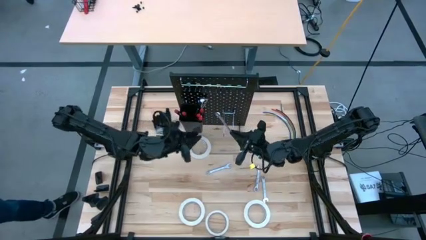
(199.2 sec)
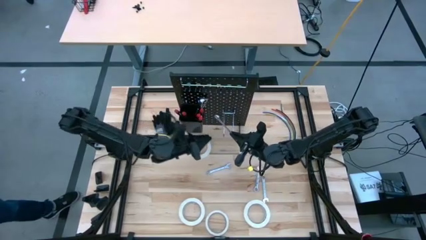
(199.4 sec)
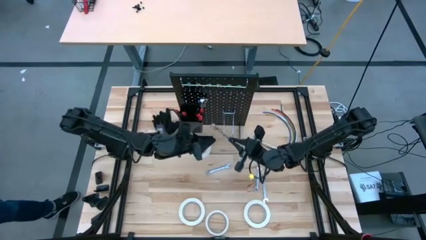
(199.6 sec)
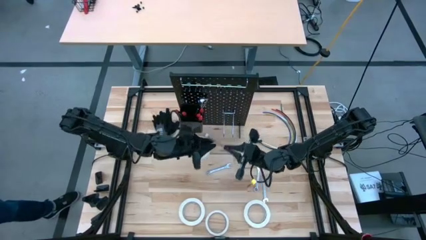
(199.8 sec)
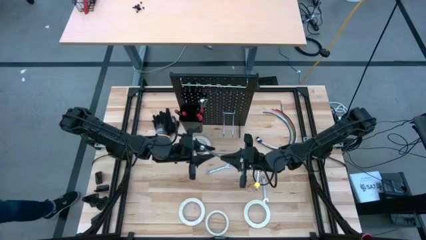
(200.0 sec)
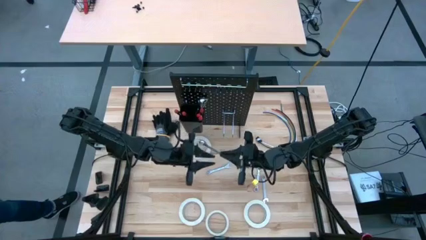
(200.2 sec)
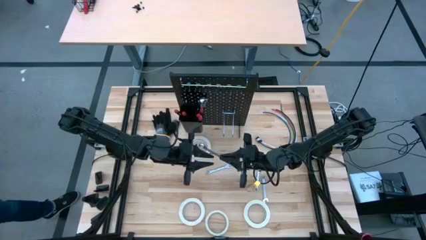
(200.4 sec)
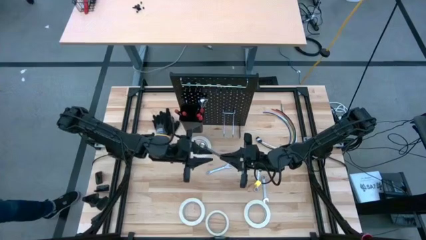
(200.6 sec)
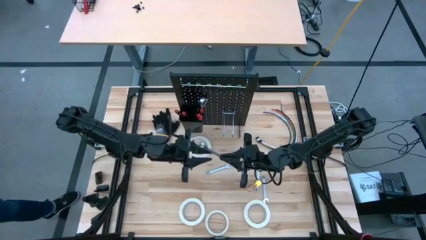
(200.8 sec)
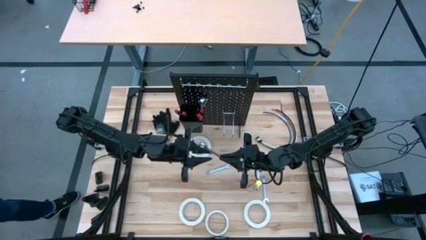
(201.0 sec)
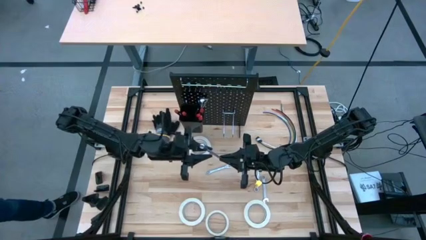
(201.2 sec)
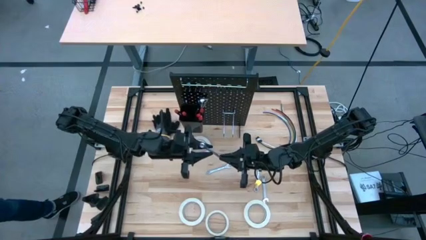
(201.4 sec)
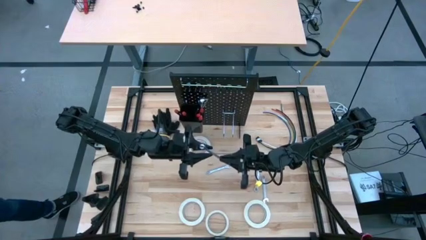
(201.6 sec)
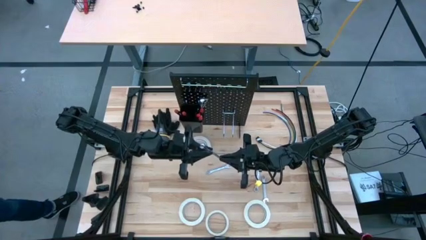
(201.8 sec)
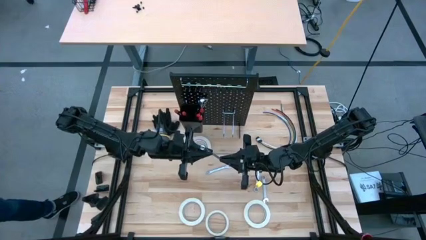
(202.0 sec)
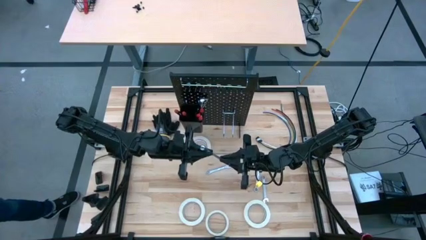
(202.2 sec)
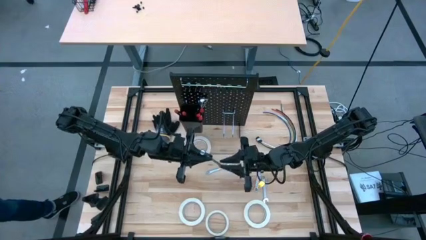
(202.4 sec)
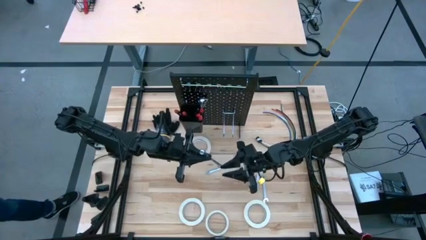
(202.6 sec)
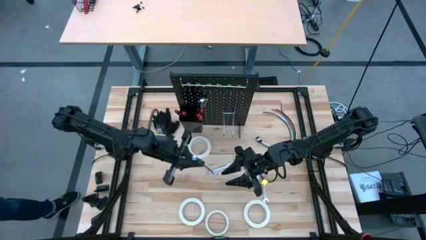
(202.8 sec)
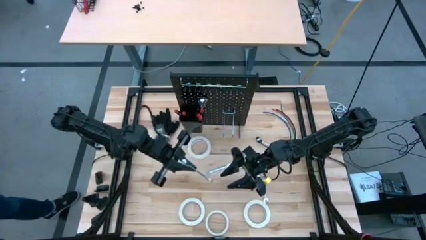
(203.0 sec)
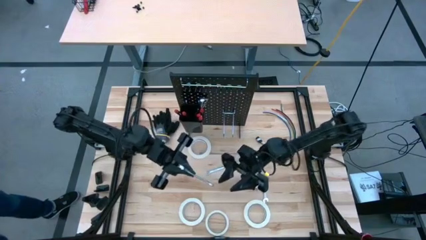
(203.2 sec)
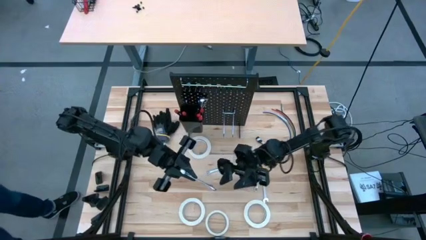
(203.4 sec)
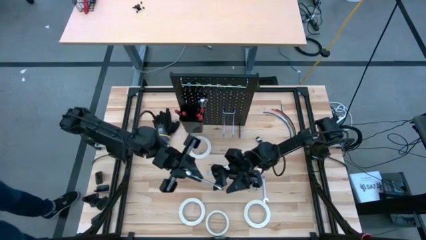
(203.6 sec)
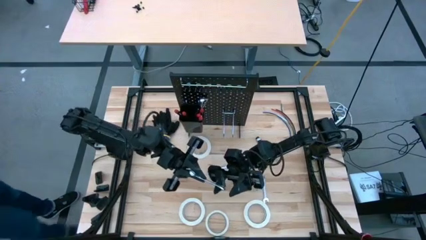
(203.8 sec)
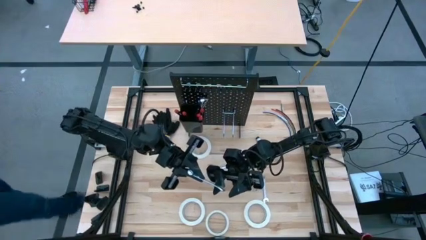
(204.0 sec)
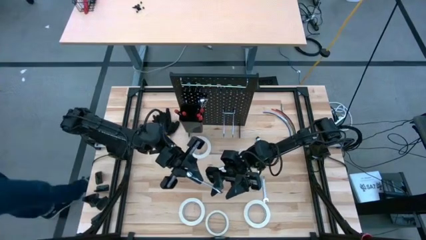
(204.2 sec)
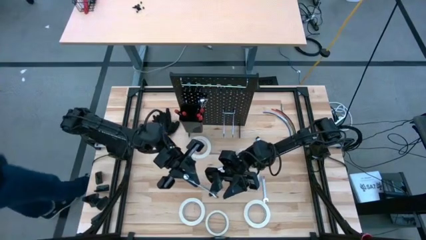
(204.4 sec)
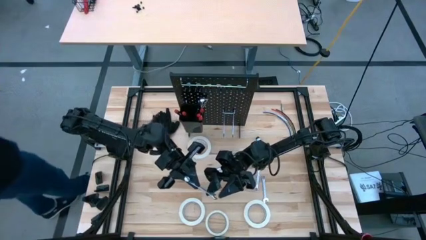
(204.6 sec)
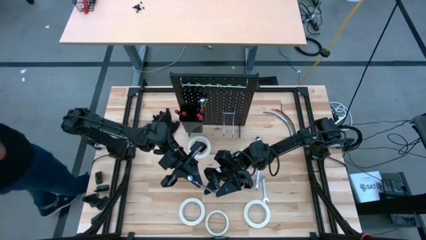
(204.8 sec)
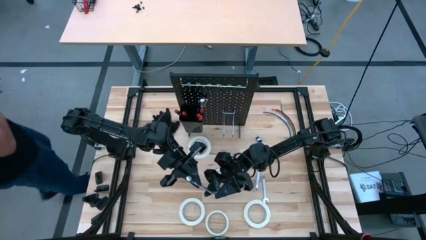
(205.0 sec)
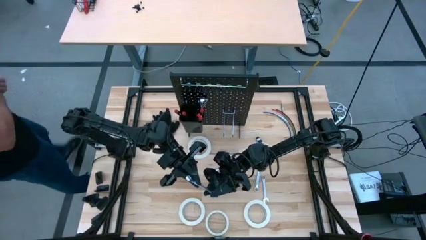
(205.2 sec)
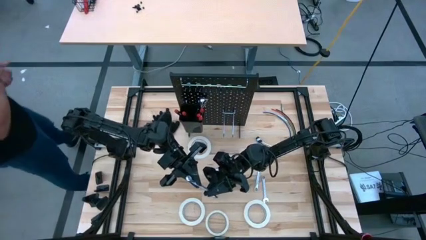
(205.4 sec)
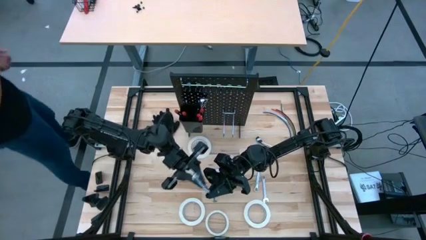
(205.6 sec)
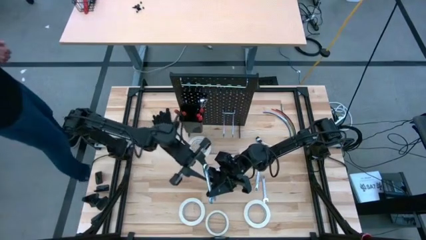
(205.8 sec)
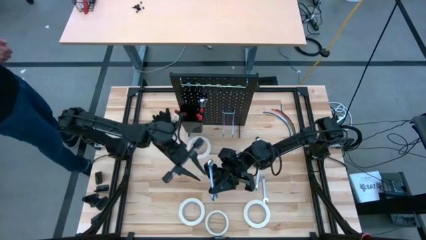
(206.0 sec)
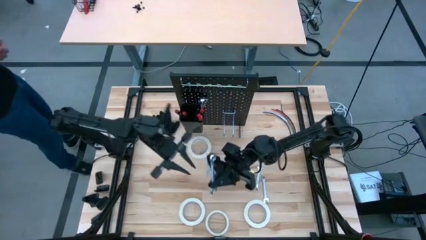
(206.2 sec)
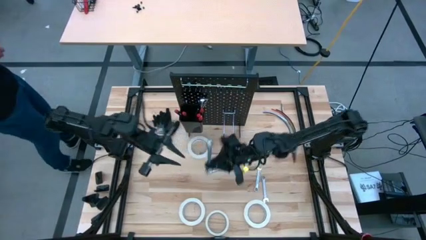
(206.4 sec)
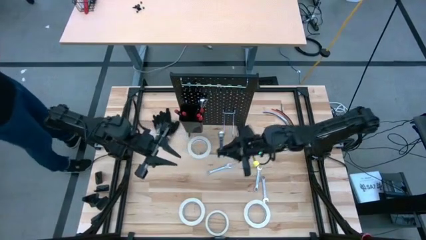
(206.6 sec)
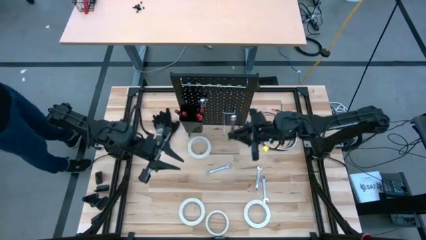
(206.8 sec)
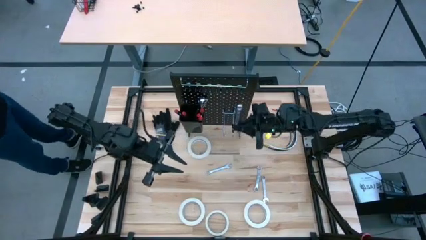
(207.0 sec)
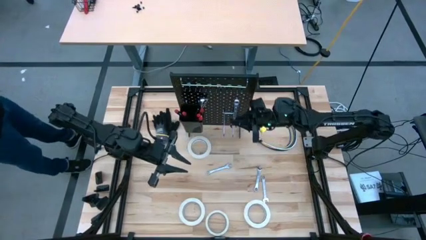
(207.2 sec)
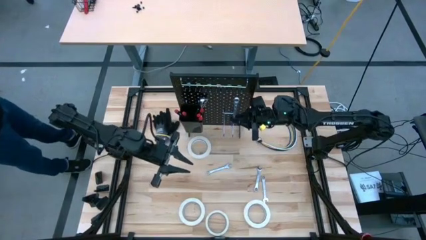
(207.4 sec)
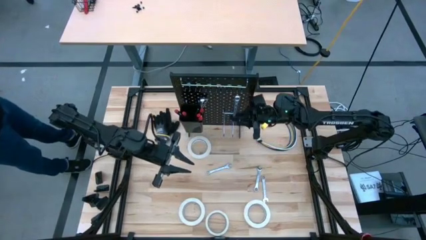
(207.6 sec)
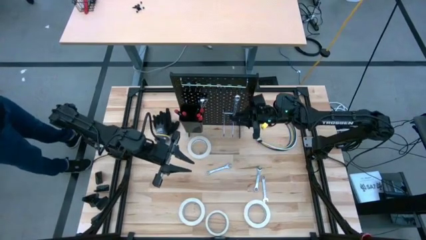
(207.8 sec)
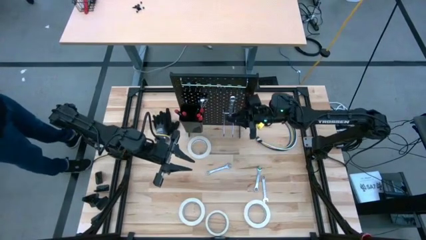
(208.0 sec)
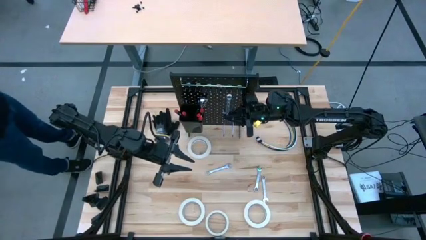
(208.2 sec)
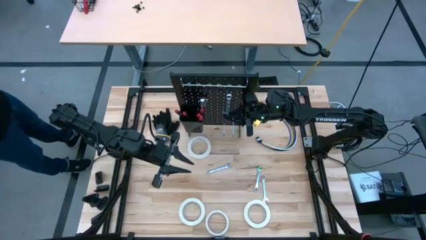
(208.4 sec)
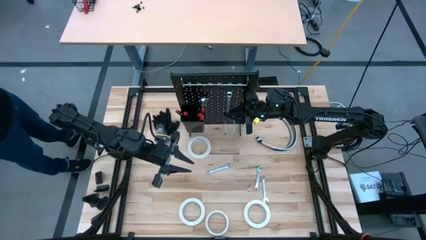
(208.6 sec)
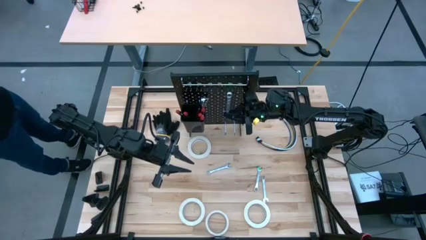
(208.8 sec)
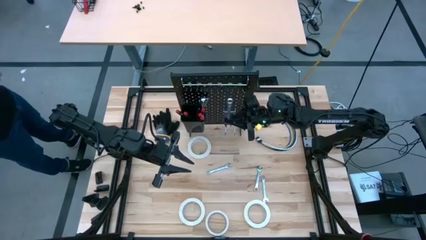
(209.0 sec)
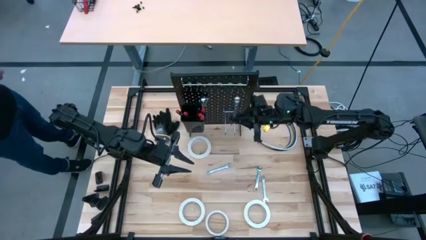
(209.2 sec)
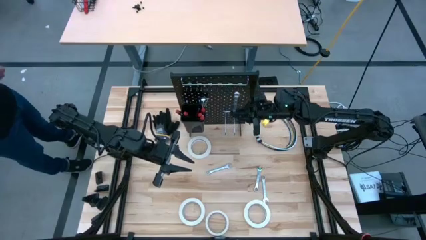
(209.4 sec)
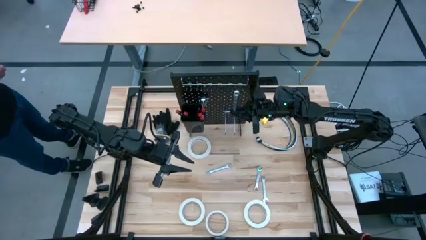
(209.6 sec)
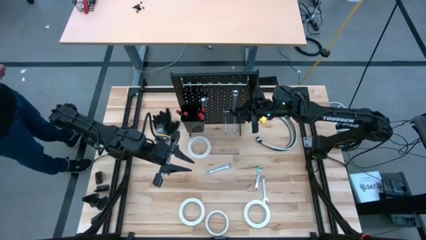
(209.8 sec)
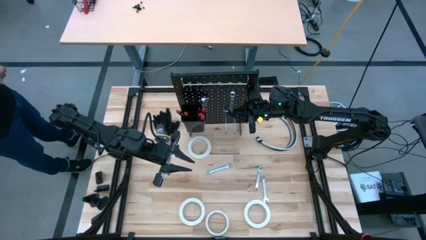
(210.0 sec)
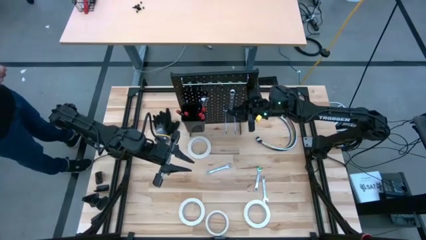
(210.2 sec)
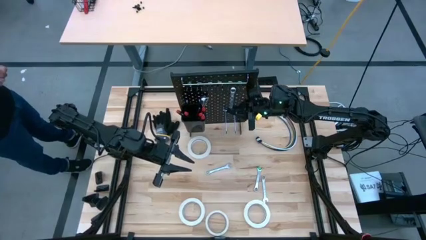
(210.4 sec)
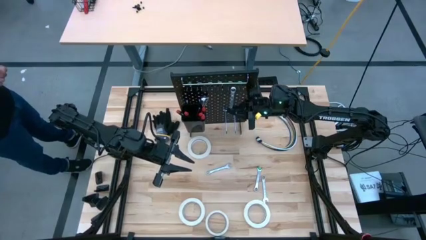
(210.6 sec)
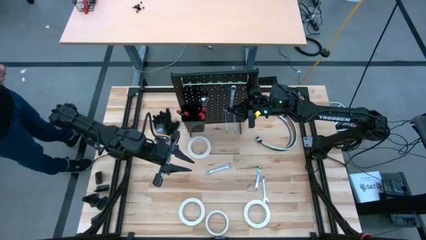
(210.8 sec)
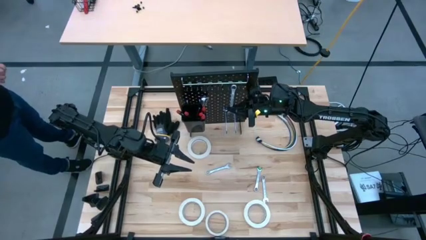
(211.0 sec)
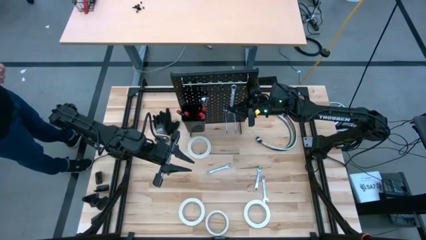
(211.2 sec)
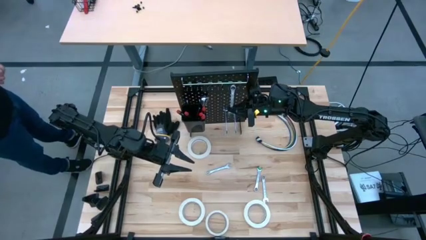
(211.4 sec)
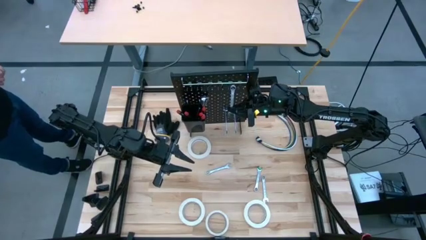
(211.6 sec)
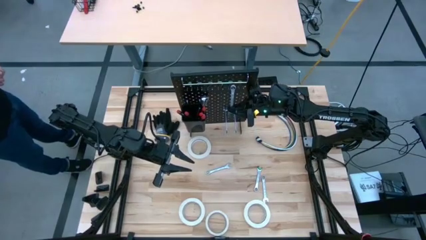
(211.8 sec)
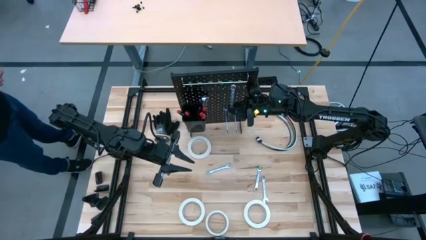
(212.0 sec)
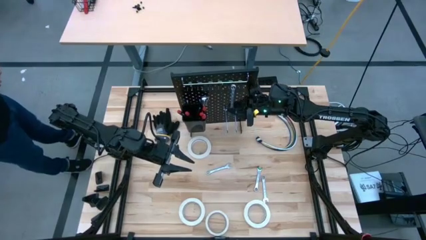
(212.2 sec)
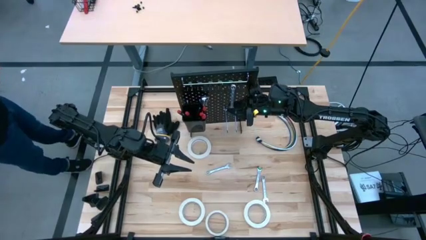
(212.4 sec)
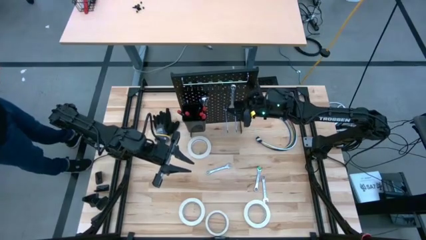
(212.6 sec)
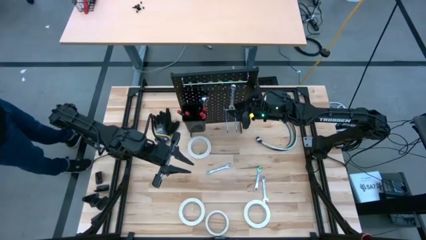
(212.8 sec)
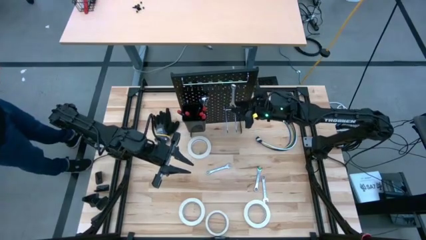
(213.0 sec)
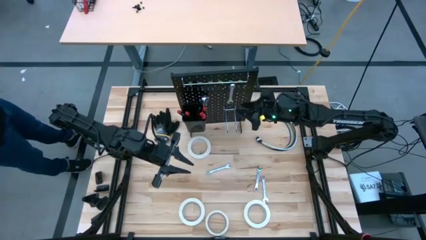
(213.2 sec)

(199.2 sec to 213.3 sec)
Task: Hang tools onto peg board
Hang the silver wrench on the peg board

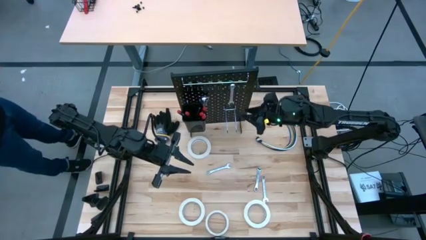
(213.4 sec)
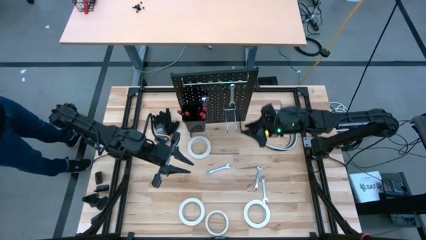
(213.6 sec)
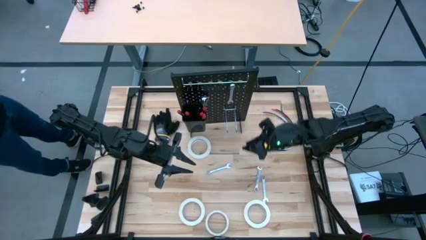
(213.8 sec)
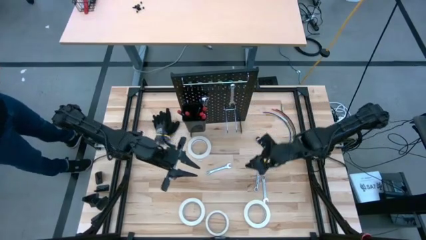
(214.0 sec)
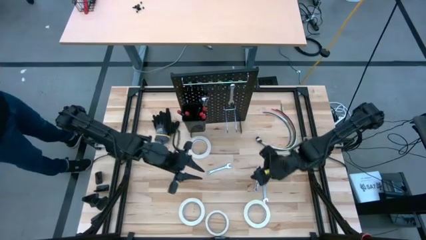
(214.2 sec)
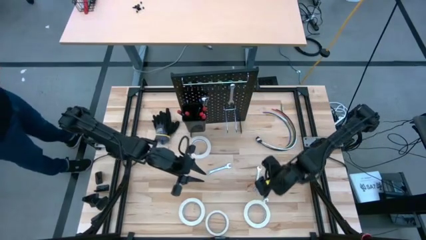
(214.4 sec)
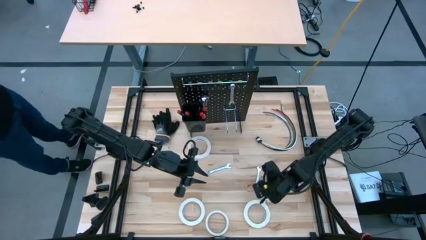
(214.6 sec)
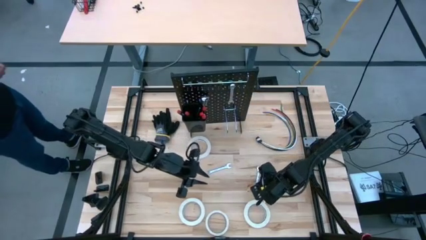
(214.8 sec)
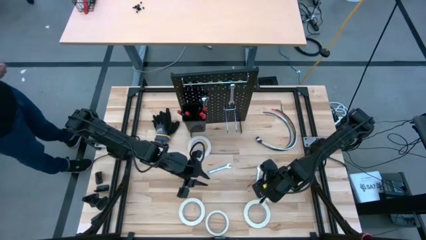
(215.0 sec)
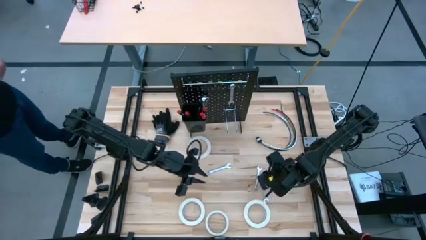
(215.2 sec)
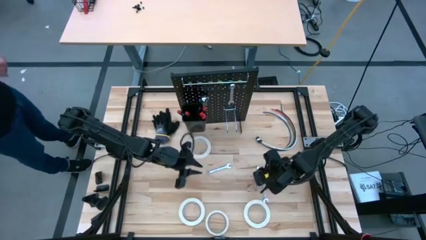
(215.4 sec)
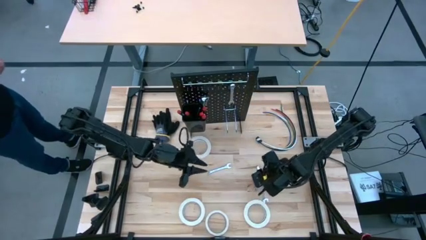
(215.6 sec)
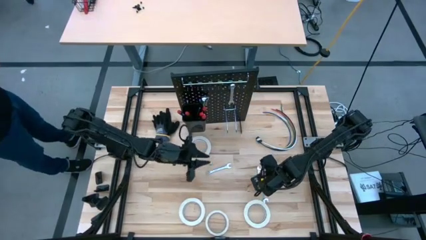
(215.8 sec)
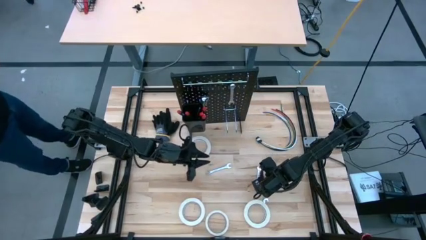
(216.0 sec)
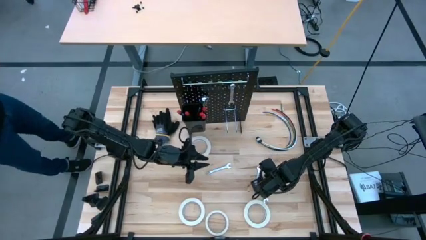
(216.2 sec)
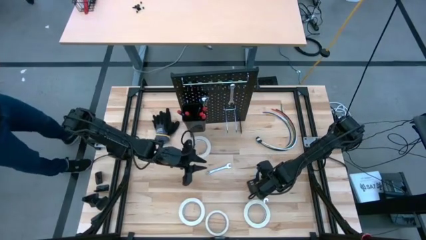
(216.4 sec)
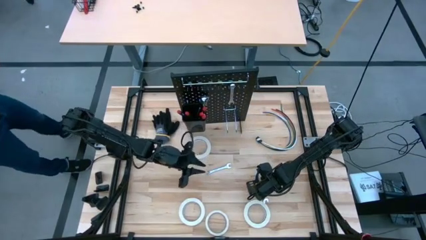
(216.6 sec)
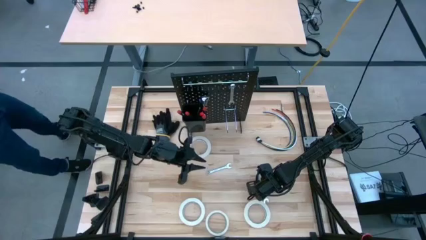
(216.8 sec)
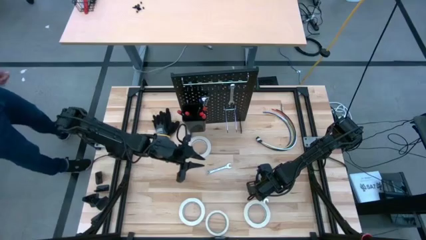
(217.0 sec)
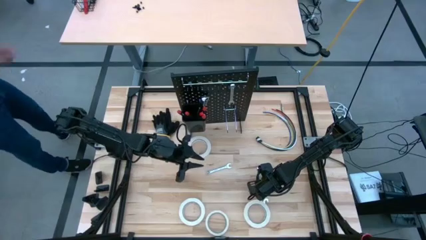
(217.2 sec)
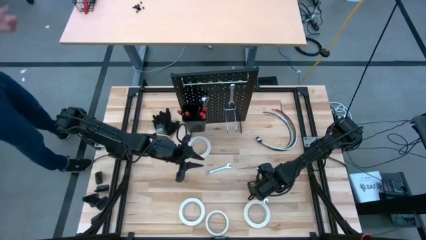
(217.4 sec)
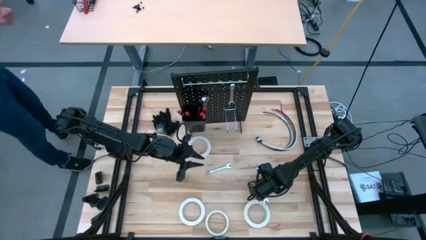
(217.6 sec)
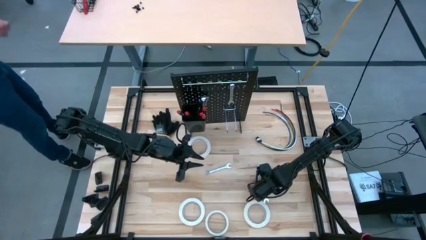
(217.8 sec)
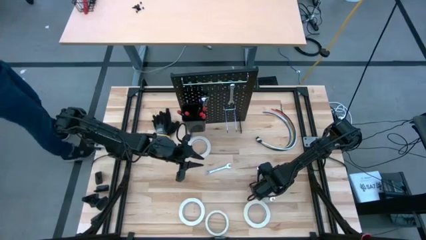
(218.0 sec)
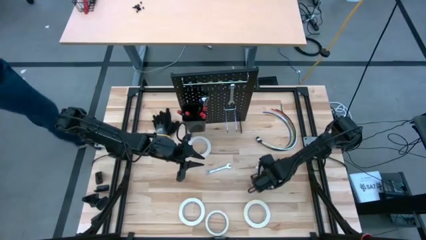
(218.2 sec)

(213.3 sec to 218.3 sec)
Hang the silver wrench on the peg board
